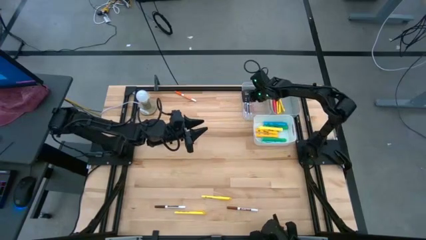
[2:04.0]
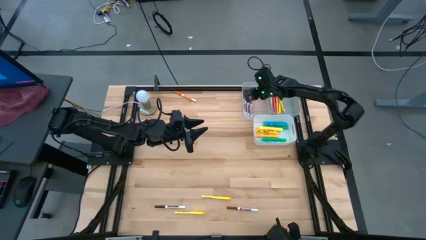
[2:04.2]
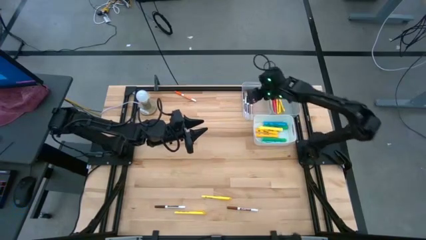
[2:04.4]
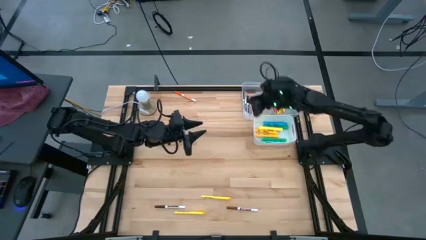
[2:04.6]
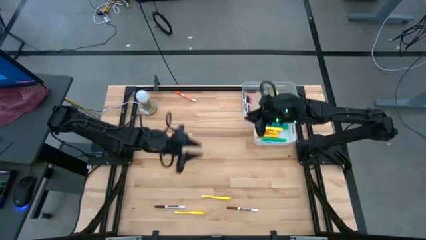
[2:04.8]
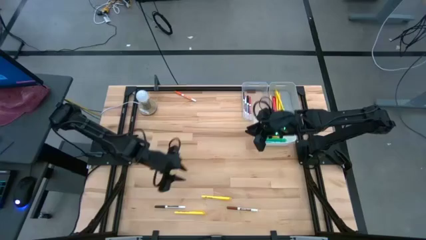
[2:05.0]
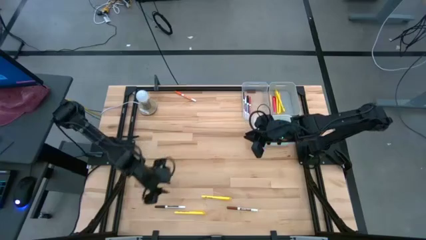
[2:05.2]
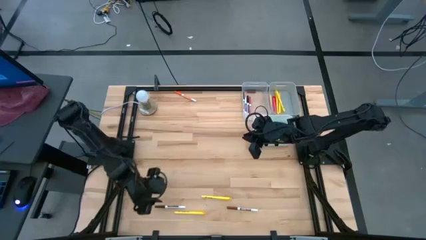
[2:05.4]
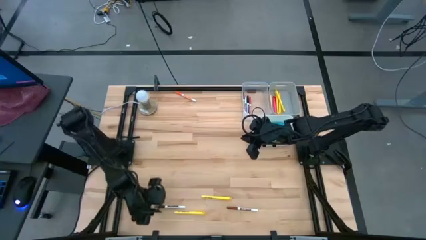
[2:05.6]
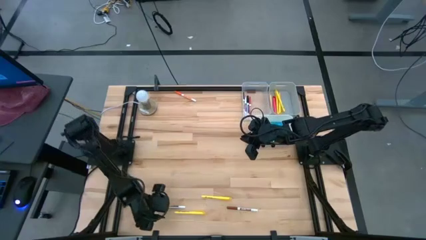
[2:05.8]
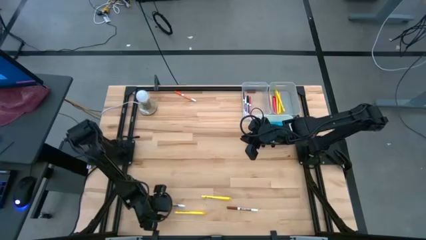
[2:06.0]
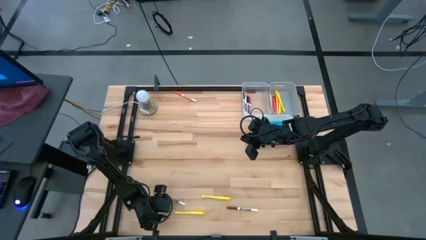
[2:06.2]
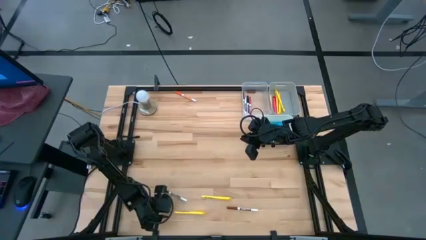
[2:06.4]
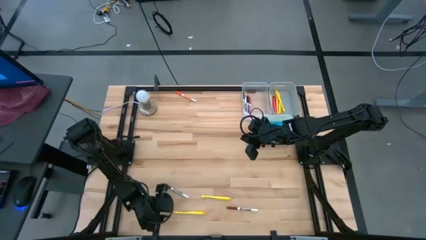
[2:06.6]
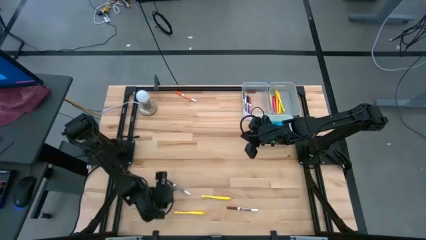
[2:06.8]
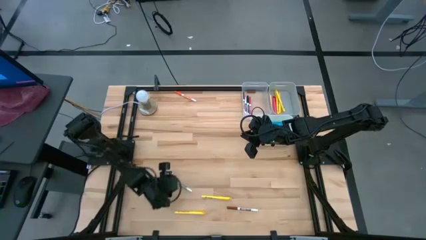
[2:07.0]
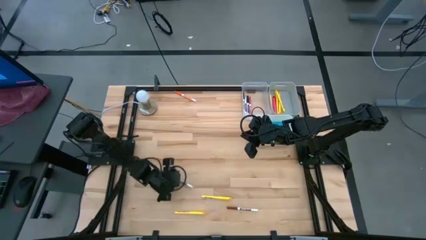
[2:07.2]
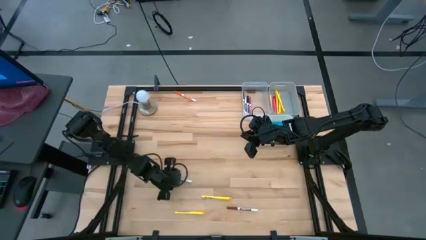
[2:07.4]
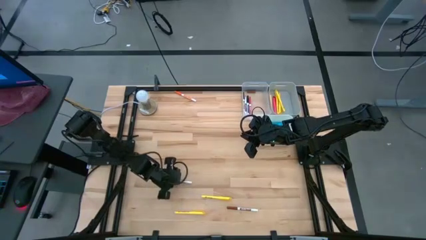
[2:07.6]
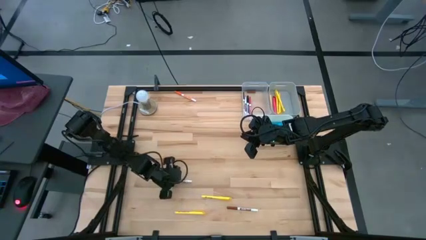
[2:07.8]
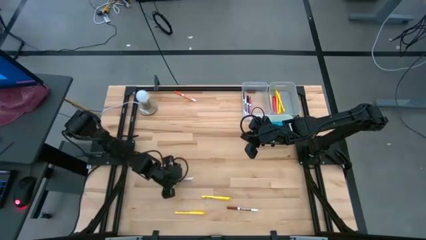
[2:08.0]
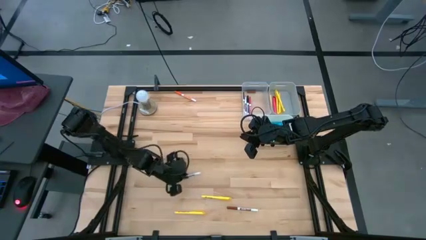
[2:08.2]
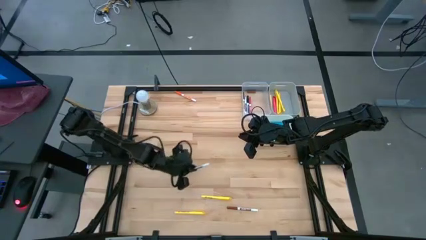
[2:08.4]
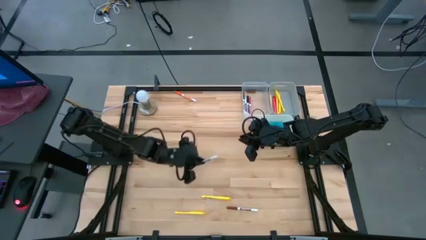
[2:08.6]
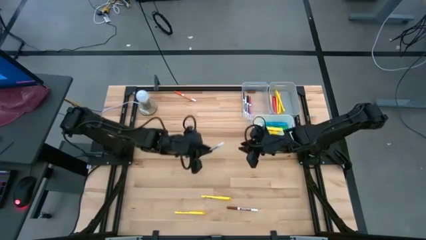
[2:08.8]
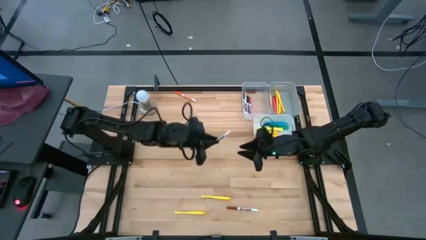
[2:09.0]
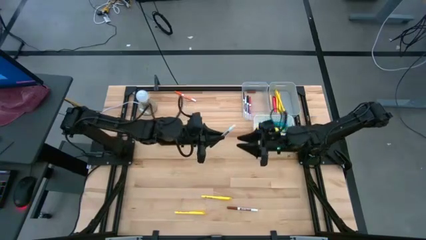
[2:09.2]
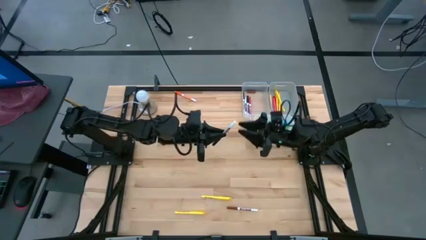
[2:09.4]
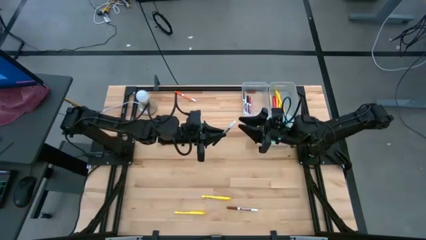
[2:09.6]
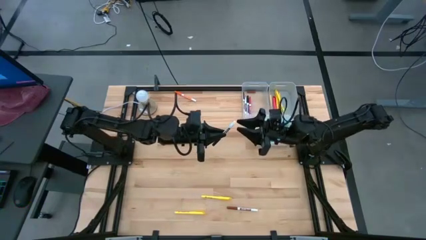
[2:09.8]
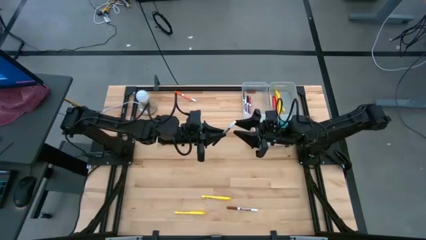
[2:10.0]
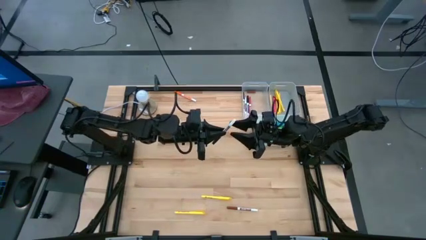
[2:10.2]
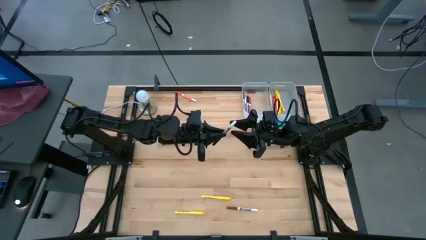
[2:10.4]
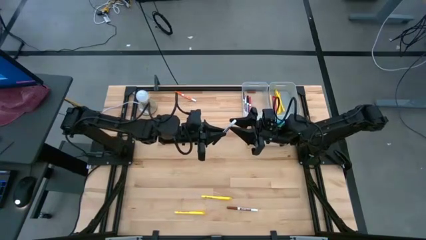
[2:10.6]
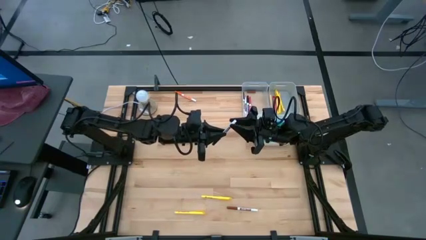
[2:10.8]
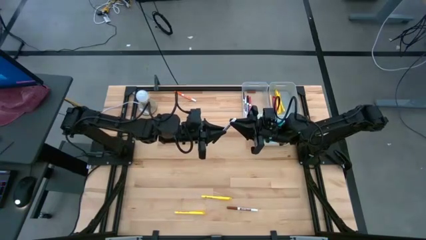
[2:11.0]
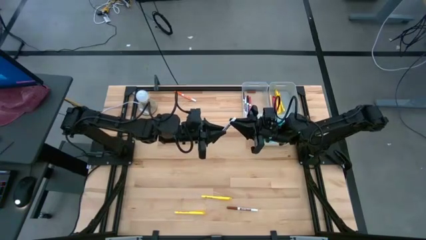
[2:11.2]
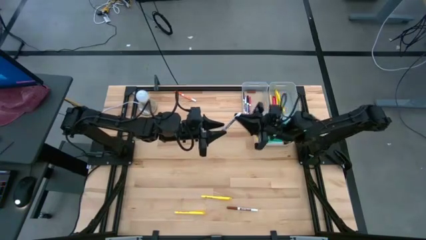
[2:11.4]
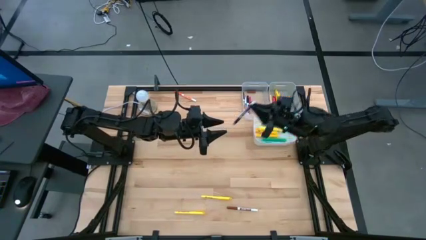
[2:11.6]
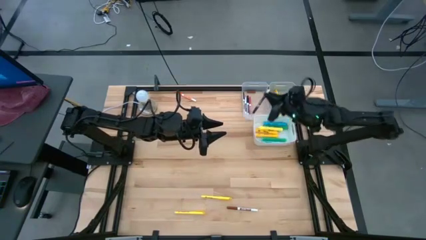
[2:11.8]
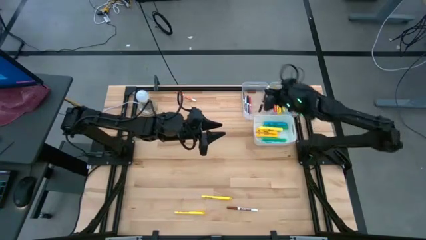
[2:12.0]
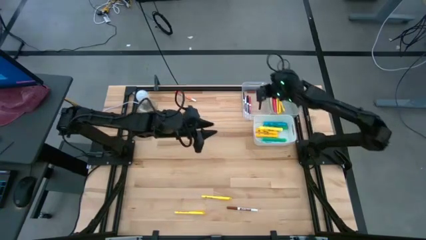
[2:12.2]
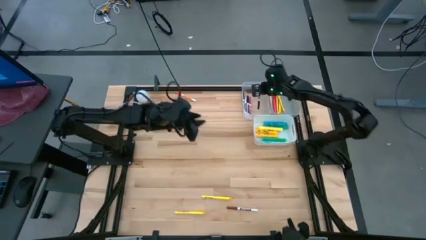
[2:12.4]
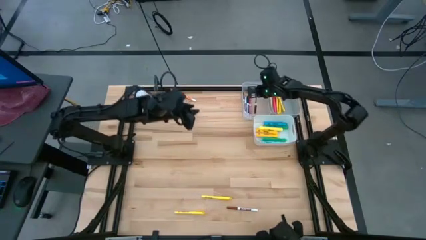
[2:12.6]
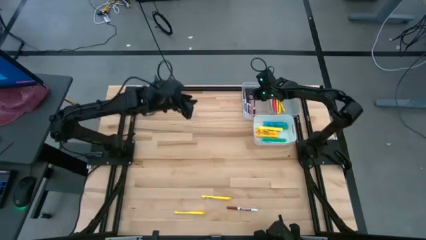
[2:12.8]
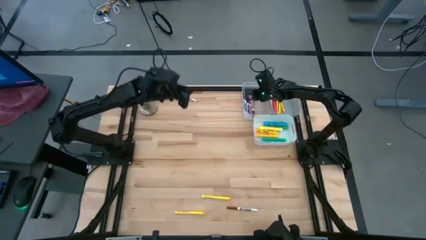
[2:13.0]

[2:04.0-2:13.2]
Task: Pick & Place Markers
Put the dark brown marker pen into the transparent bin

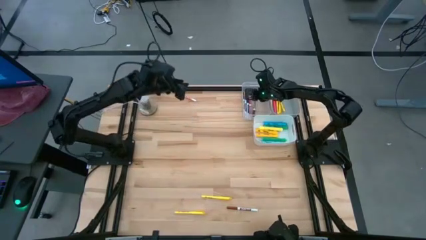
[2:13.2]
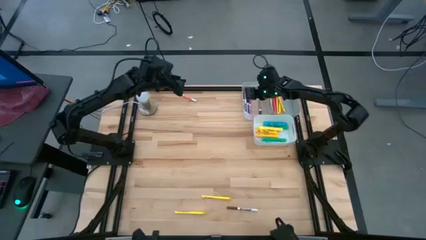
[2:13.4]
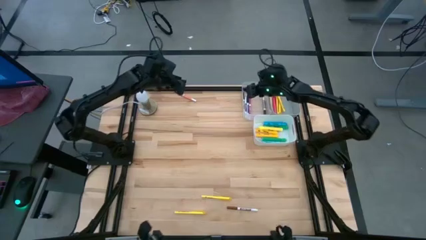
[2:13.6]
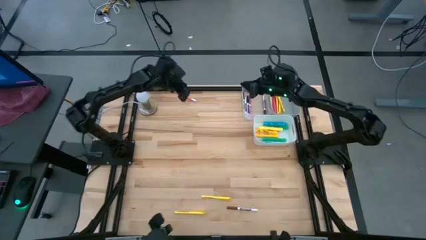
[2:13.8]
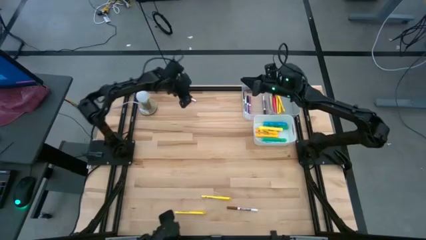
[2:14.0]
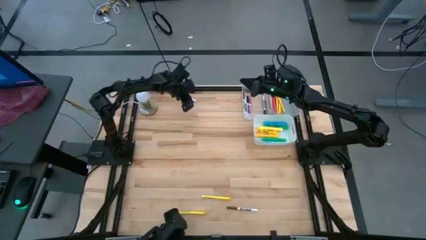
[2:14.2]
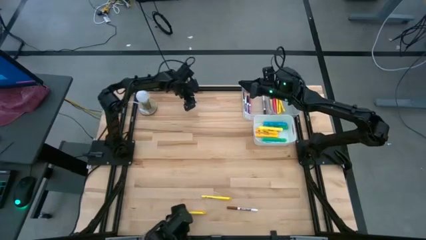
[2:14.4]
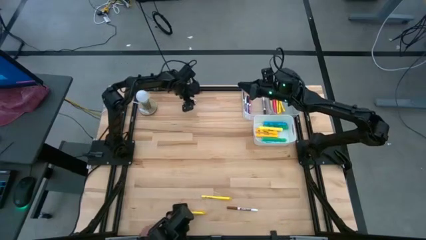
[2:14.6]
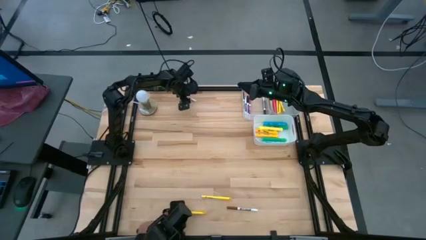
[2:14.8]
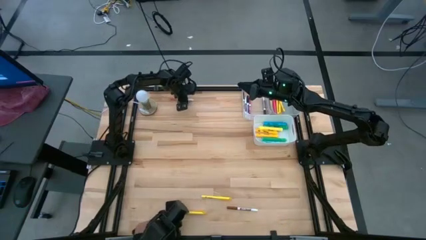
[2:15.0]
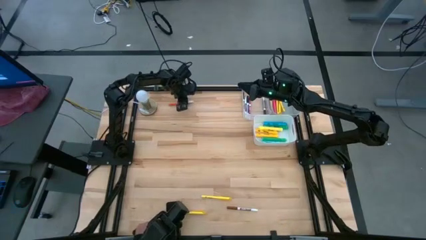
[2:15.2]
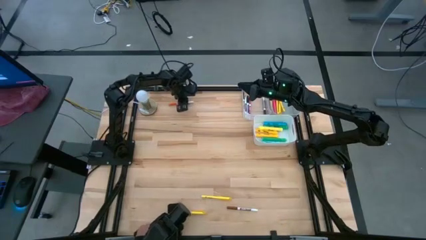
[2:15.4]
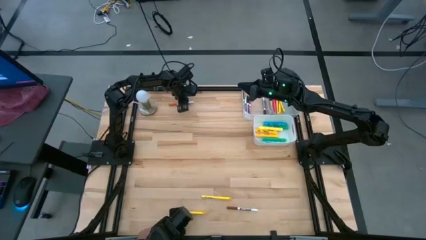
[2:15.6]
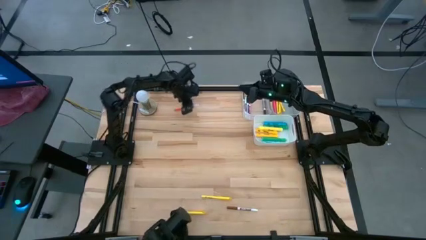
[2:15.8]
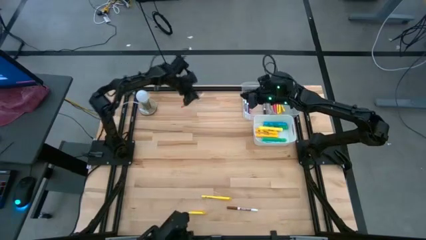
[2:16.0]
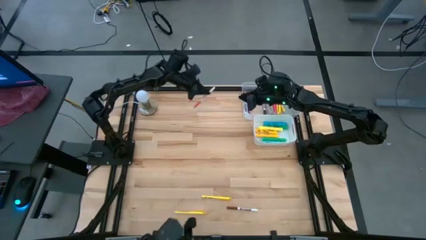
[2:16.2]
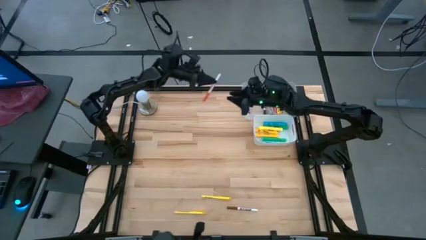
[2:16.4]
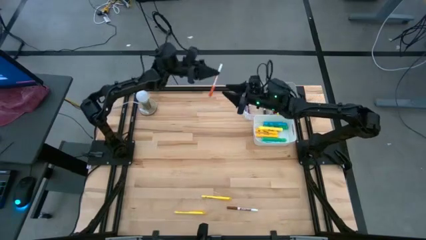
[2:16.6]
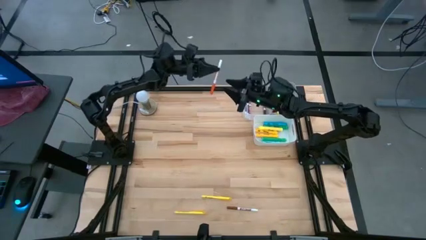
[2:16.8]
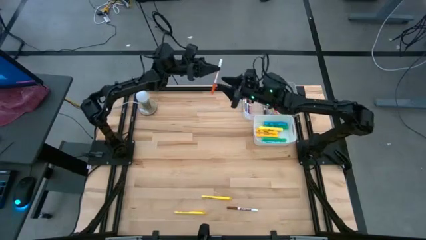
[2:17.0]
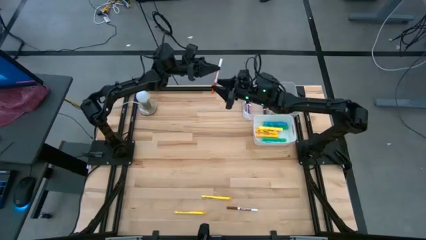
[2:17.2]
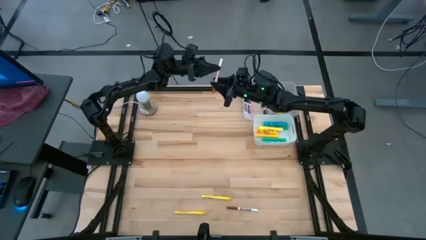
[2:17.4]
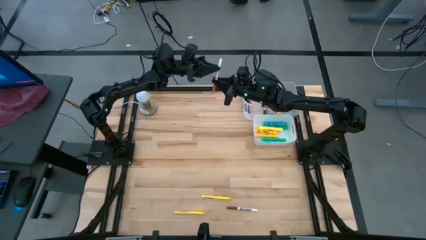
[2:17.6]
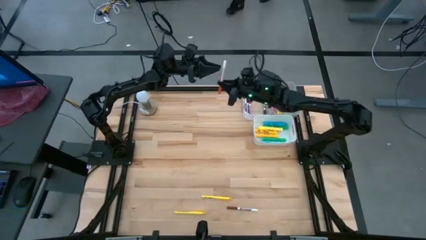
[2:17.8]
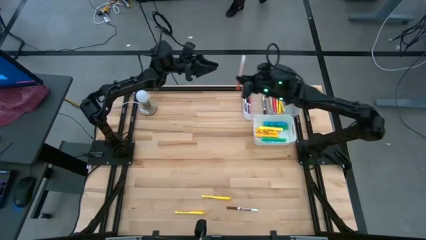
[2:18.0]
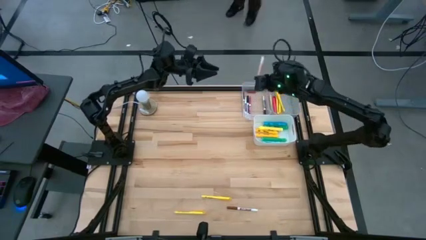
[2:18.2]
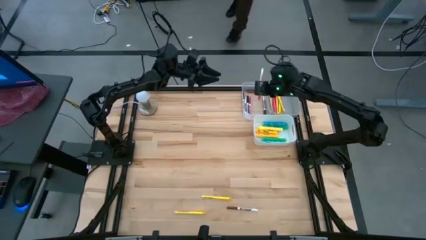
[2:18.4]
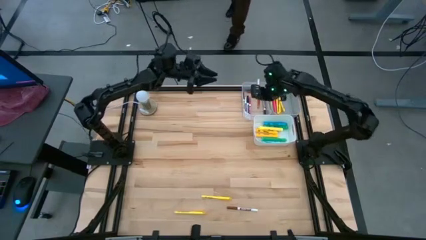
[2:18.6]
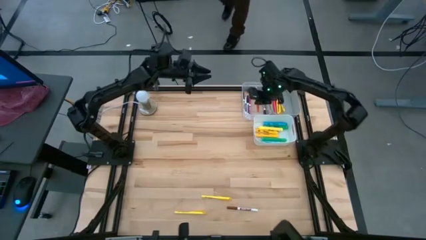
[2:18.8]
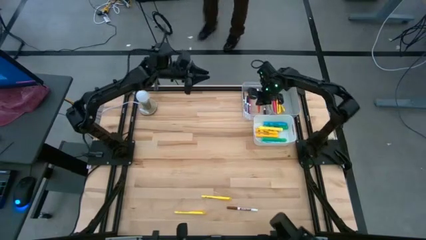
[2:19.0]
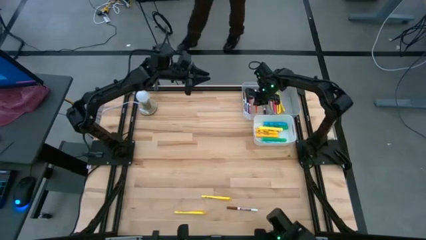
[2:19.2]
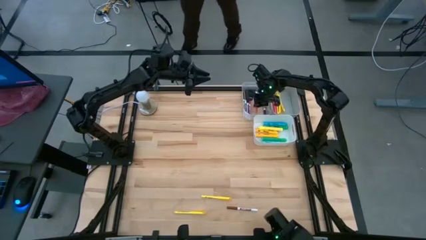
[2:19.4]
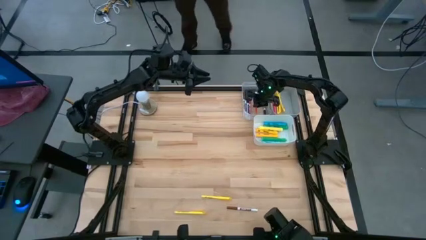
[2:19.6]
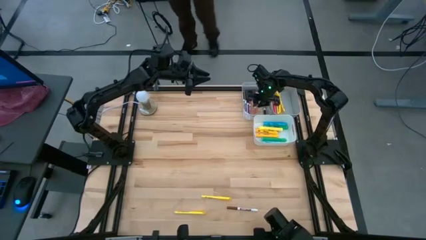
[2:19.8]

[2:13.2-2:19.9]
Put the orange marker pen into the transparent bin

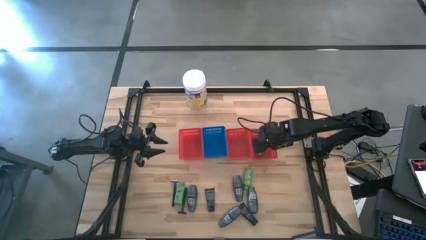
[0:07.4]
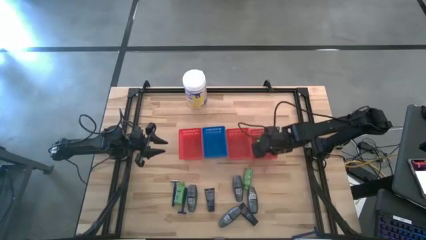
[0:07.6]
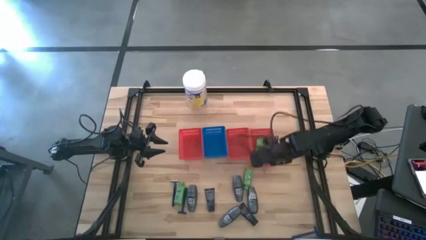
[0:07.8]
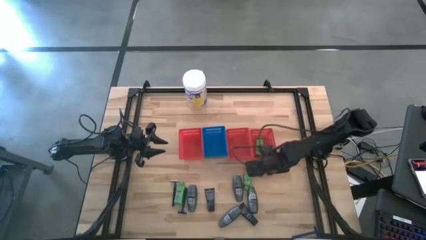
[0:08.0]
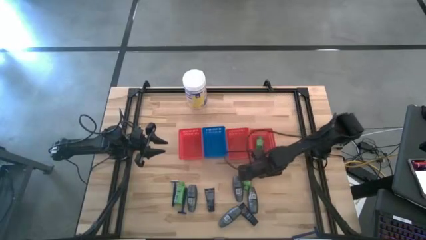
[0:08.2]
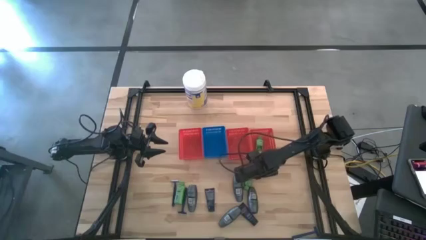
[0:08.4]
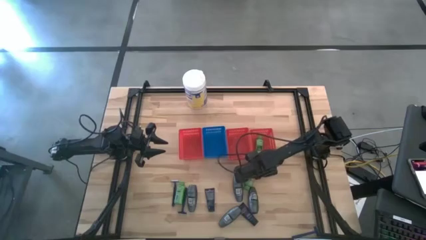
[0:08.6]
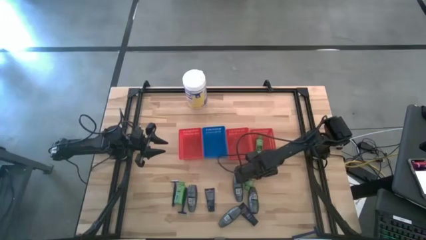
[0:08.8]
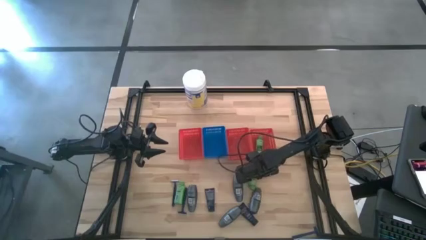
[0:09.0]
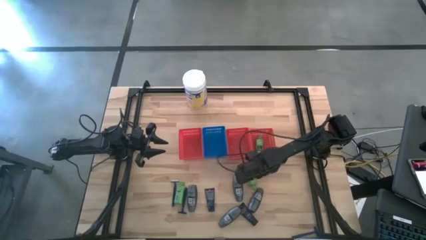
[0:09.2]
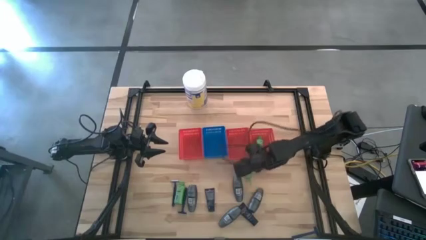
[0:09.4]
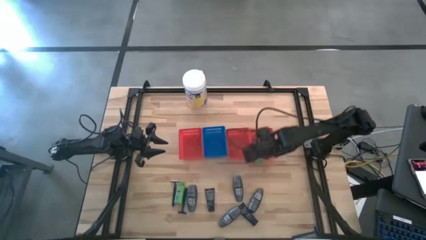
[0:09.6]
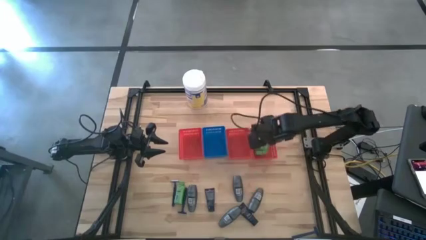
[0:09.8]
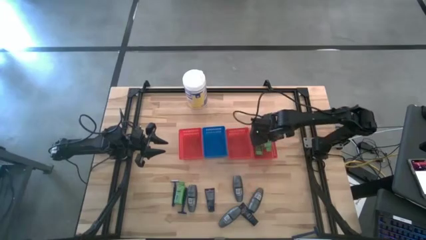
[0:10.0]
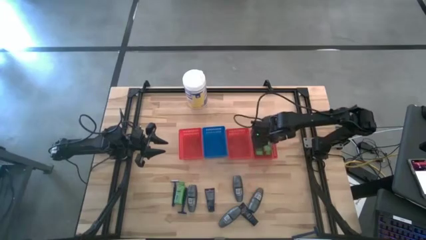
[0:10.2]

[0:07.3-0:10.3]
Task: Pick & Place Travel size toiletries
Put the right green shampoo into the right red bin
